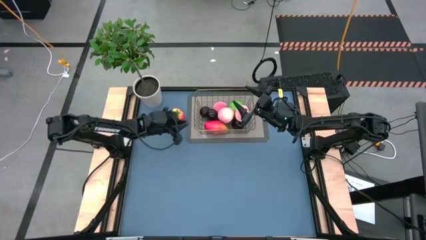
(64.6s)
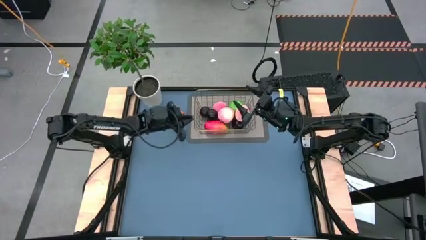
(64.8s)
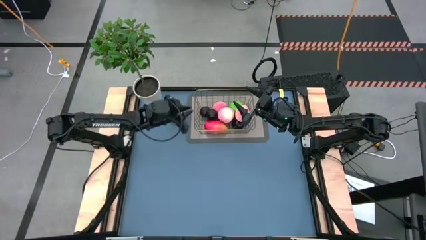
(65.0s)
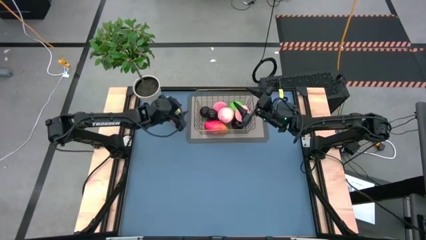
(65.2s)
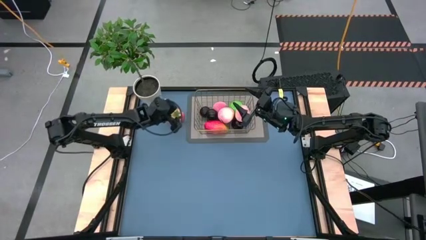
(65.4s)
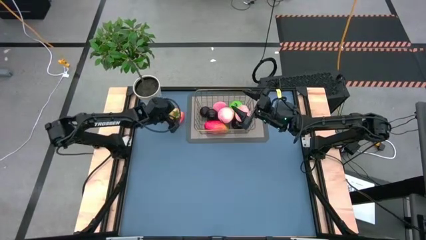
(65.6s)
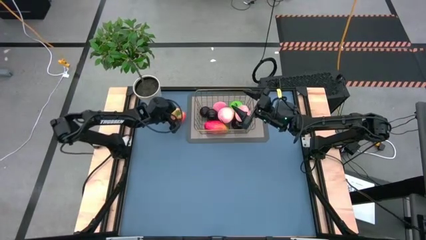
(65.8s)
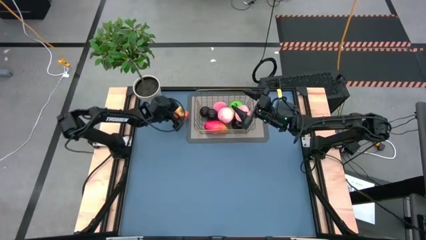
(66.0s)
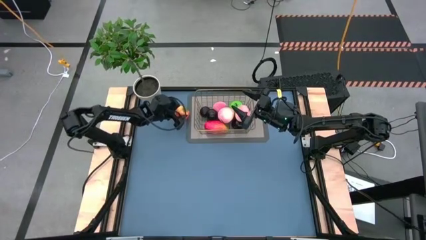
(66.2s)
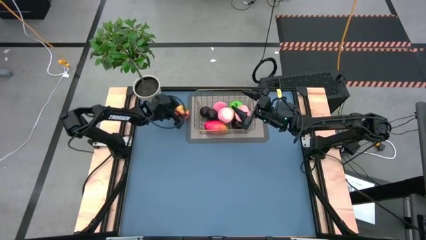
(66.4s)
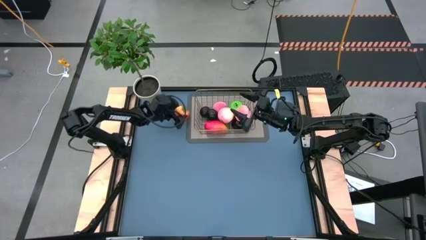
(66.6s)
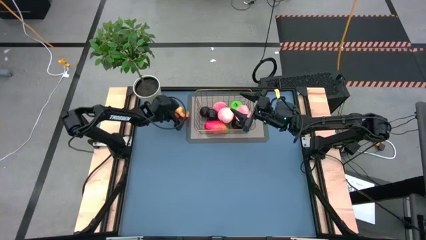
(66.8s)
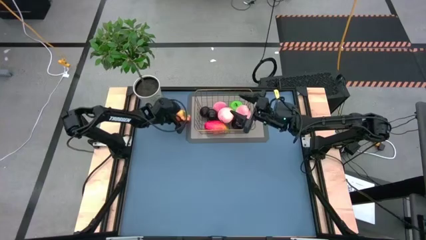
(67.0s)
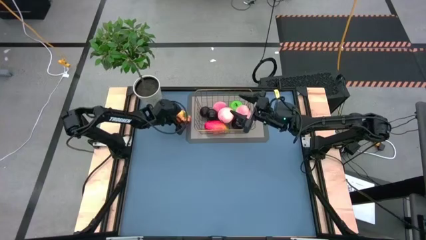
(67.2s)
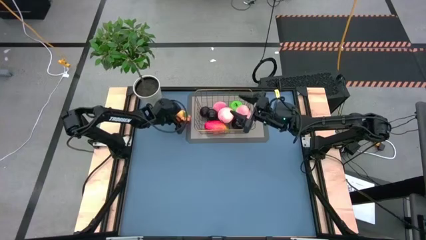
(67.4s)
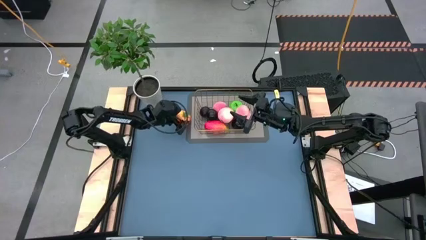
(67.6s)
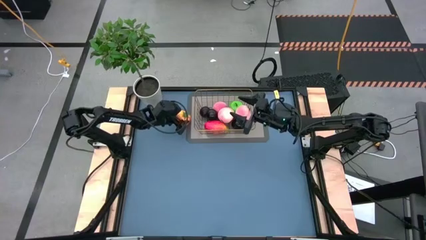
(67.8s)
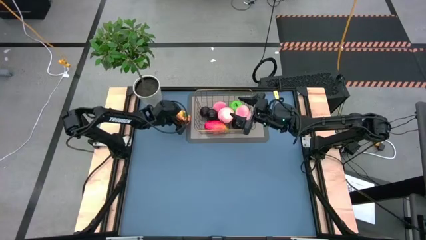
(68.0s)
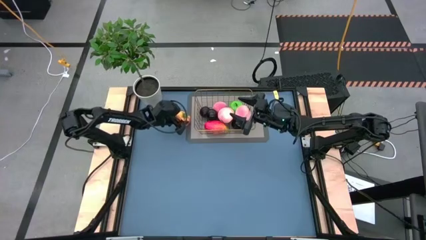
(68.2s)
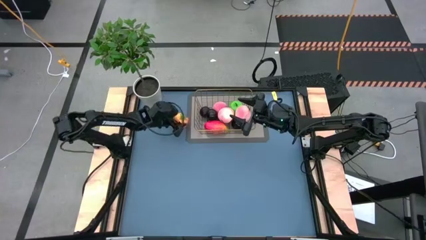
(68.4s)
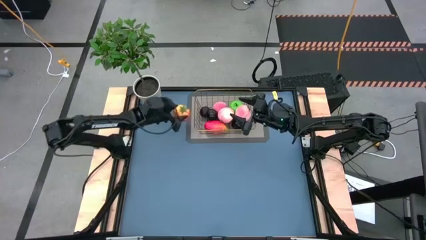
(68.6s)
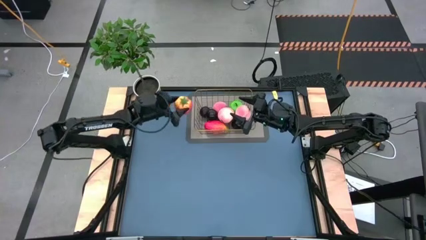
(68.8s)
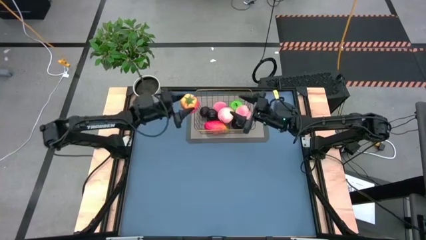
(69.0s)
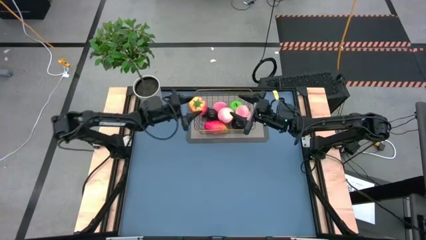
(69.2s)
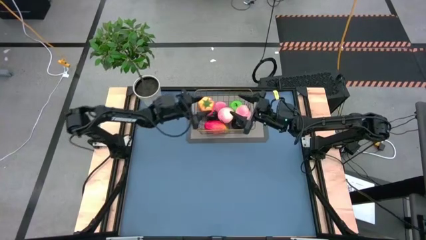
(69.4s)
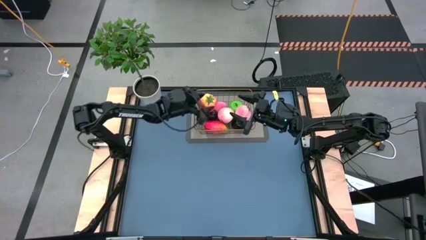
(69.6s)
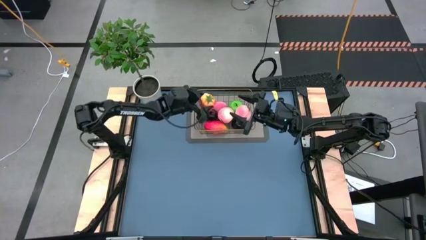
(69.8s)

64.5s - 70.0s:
Task: Build produce basket
Put the orange tomato into the wire basket

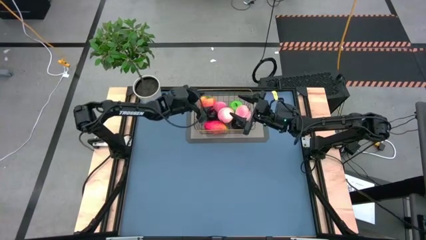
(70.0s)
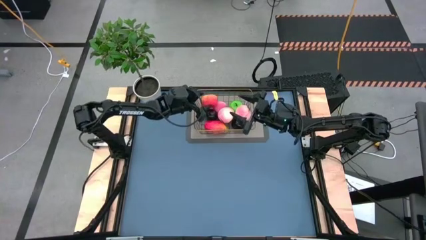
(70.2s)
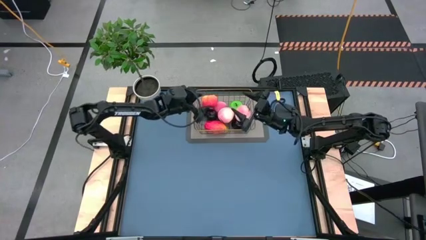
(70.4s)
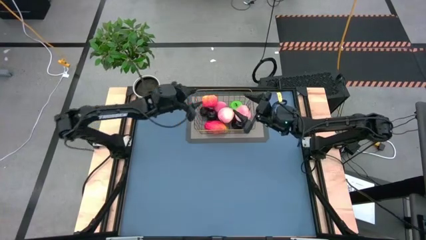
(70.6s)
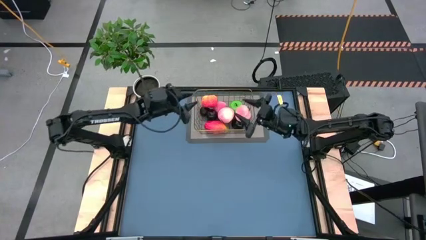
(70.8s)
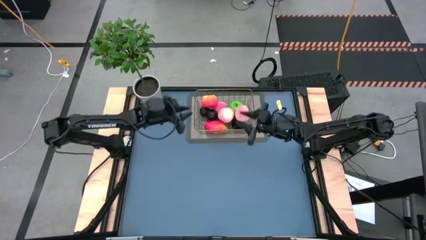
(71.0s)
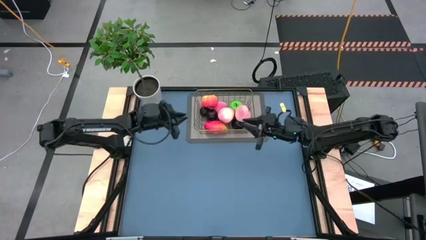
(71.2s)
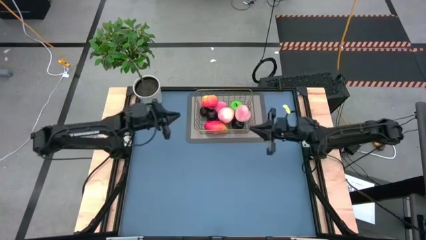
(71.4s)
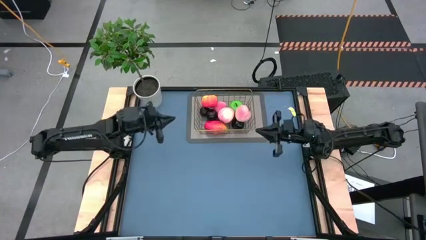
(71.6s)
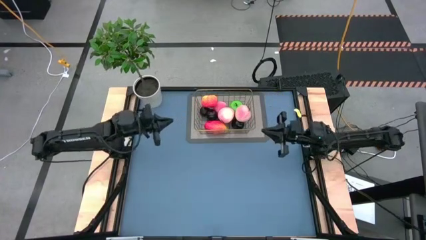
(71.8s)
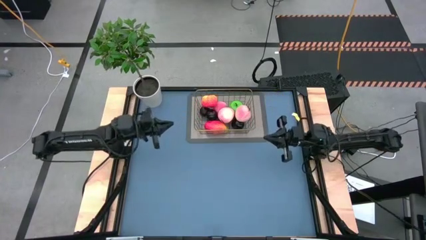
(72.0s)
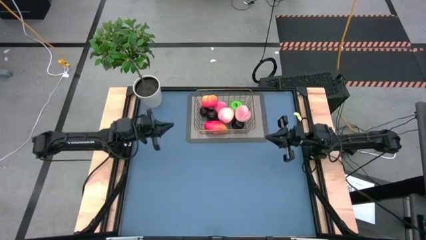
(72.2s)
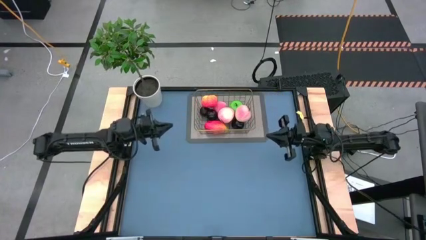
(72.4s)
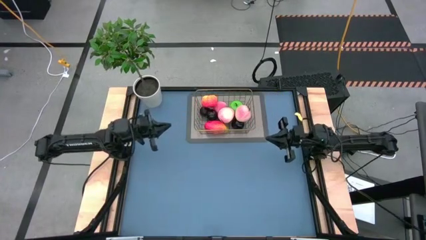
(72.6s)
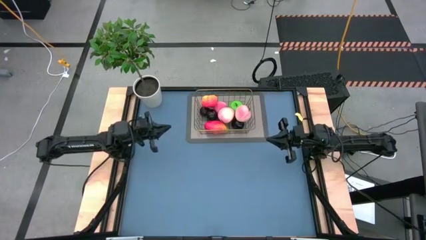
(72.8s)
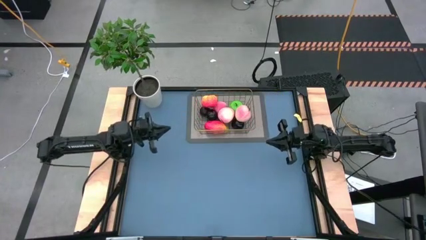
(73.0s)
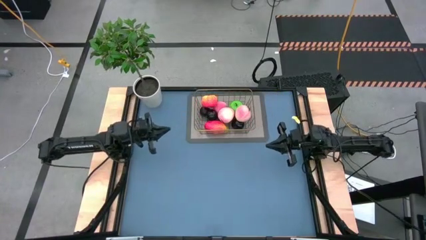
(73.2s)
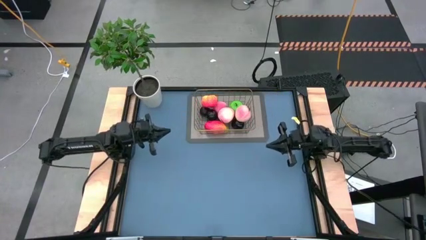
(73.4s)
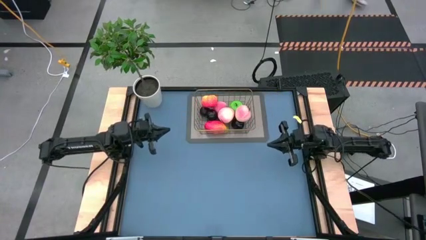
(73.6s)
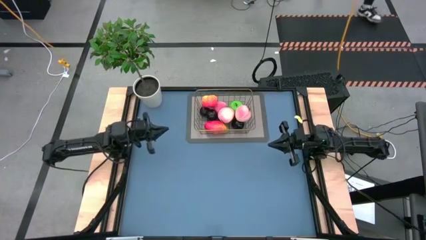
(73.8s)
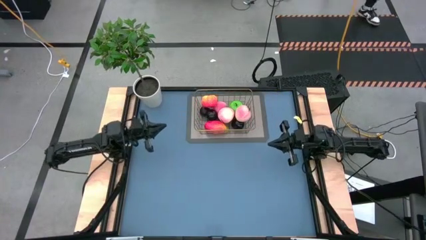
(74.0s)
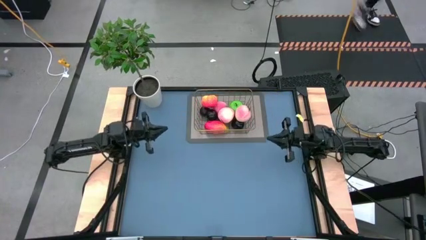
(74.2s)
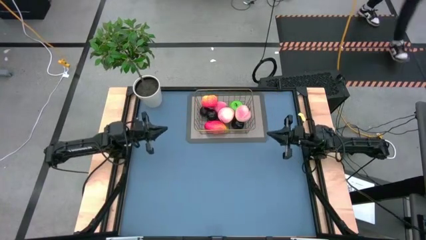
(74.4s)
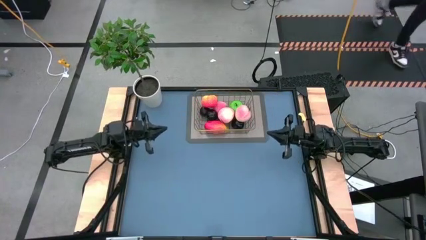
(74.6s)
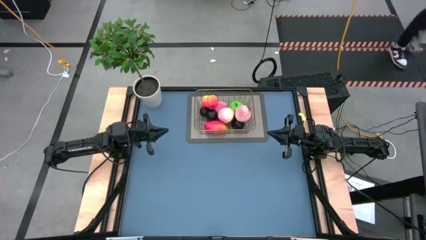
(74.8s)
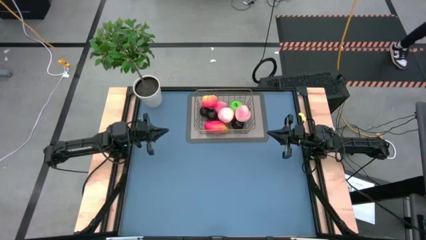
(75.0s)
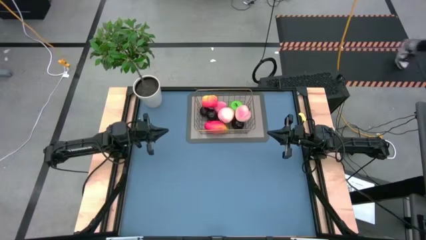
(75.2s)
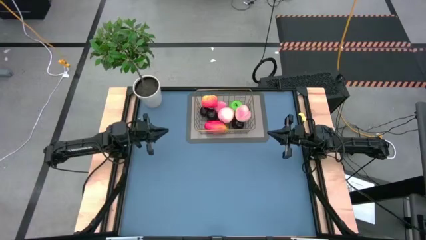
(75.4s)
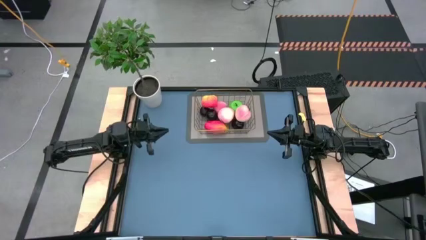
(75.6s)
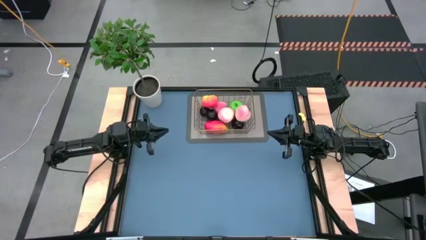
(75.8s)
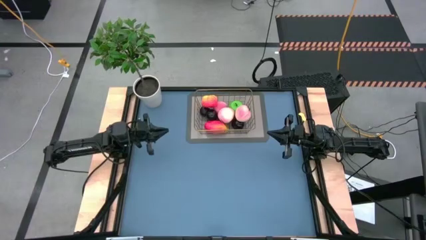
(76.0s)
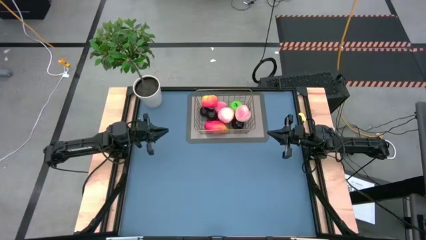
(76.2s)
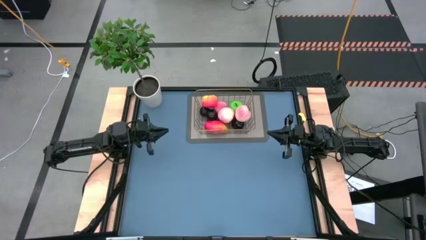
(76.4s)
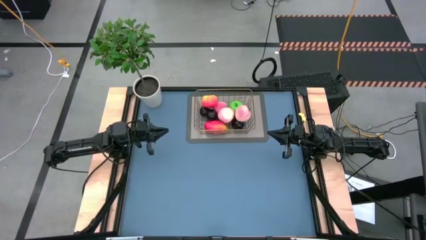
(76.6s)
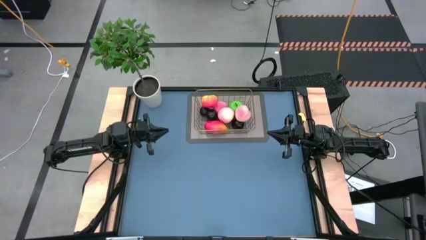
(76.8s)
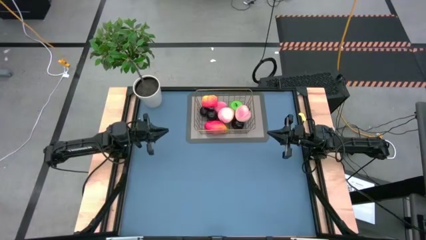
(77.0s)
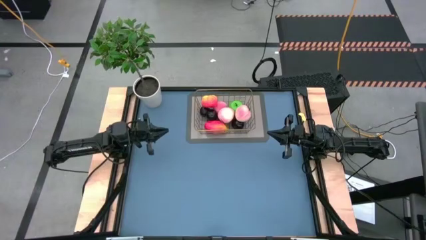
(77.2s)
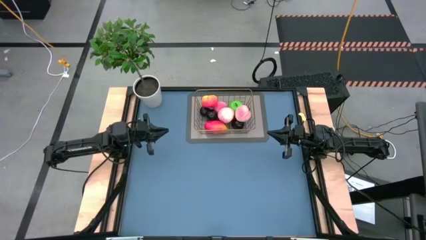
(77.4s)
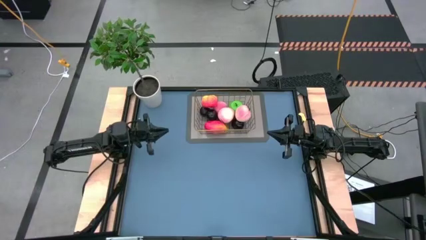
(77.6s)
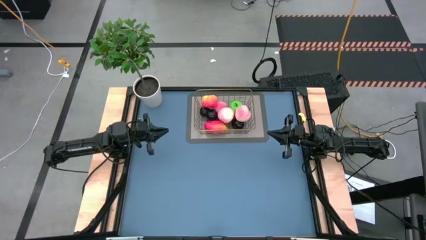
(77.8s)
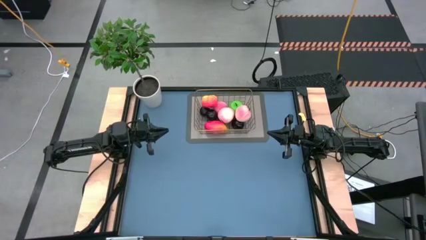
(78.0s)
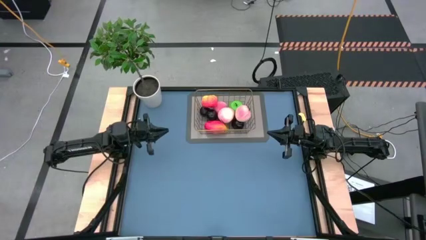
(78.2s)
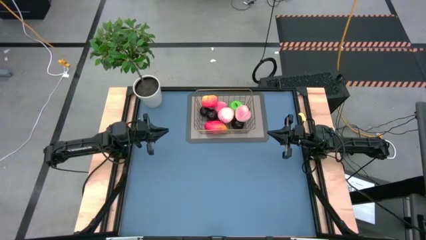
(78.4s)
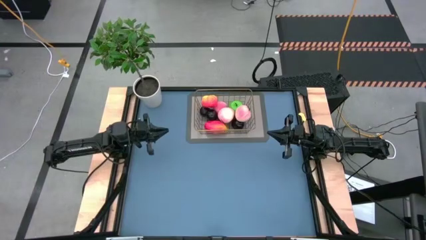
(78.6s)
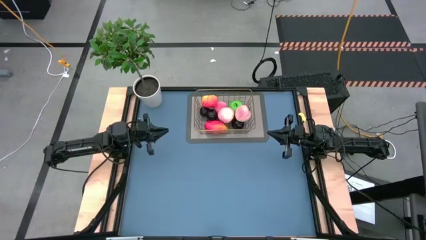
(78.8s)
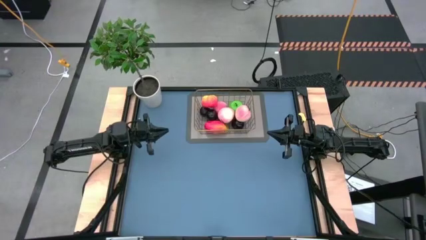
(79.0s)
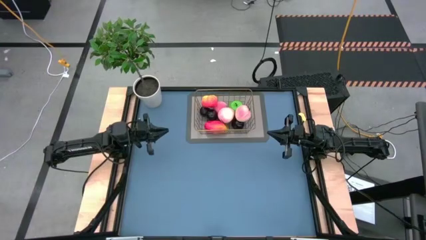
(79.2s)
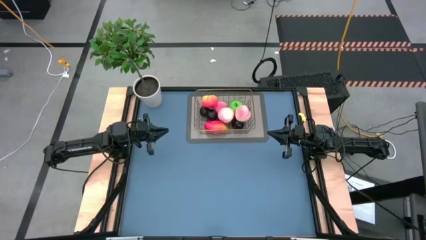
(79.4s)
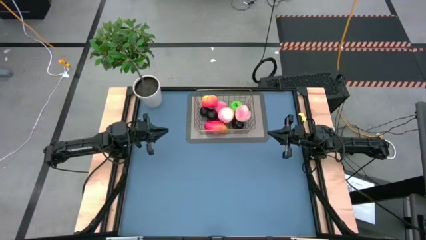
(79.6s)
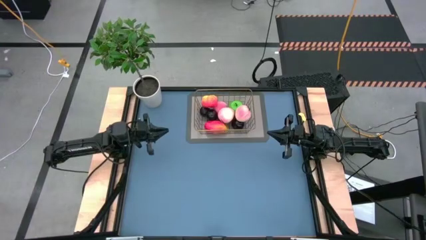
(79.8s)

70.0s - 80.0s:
Return to Home Position
